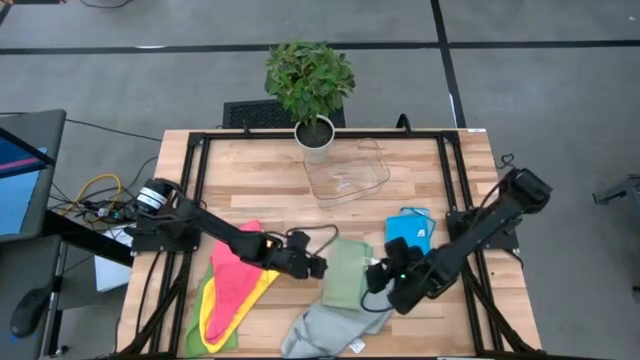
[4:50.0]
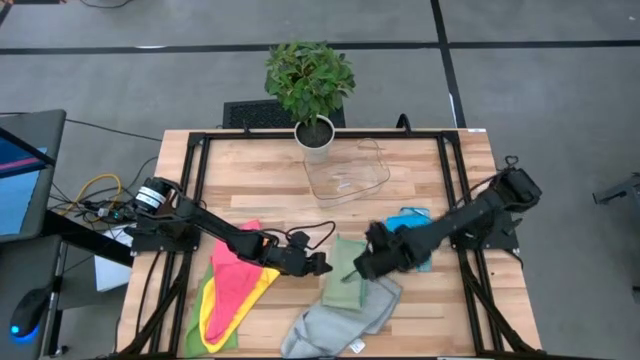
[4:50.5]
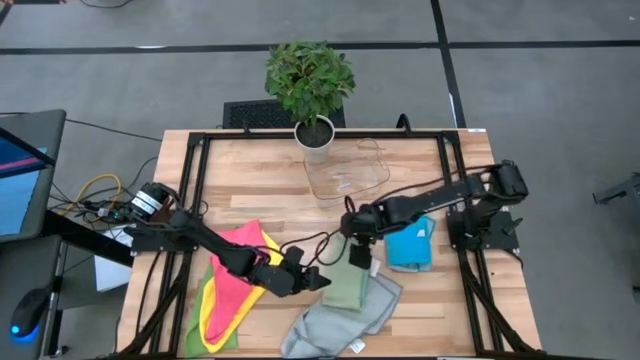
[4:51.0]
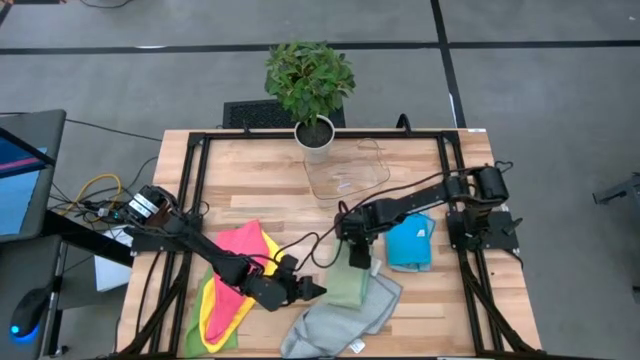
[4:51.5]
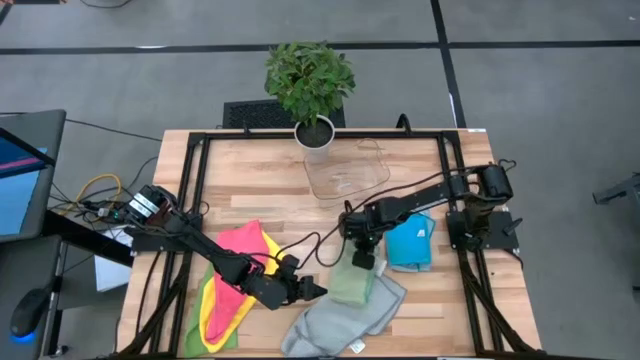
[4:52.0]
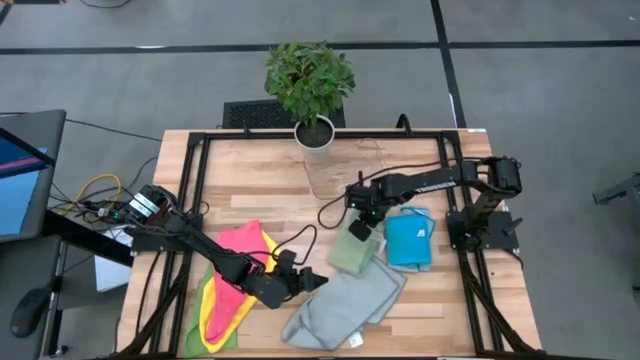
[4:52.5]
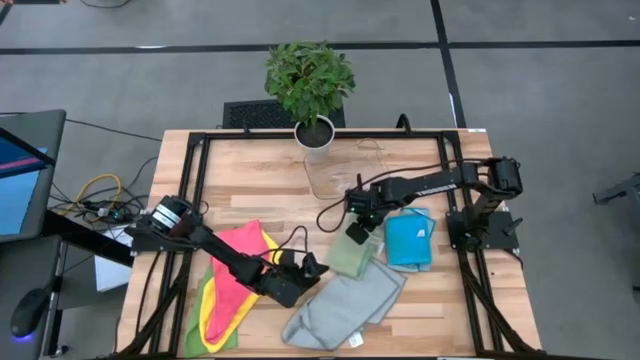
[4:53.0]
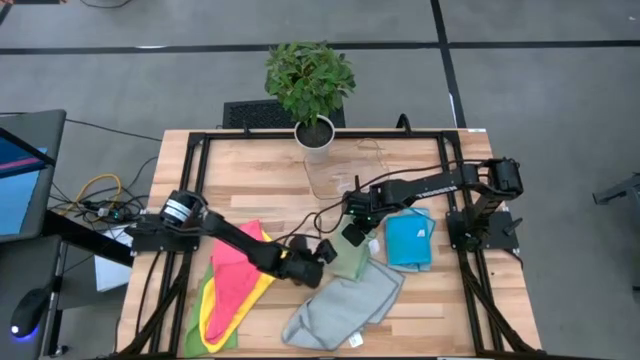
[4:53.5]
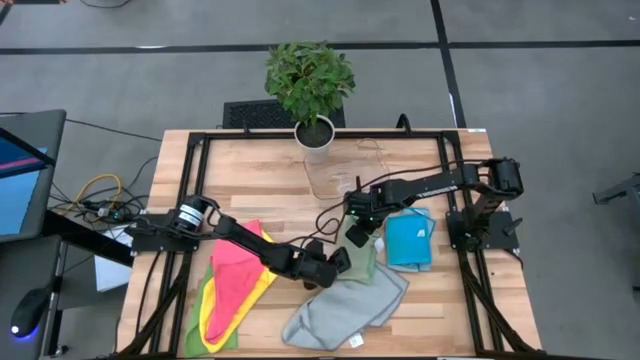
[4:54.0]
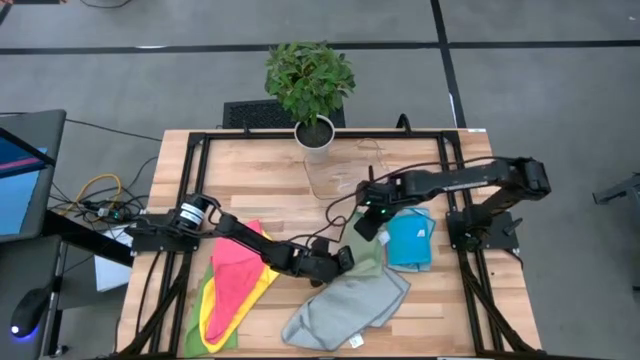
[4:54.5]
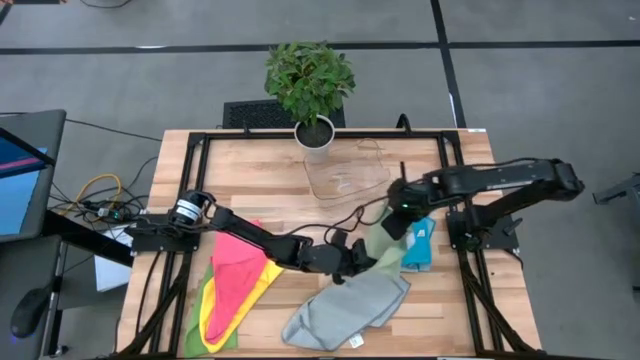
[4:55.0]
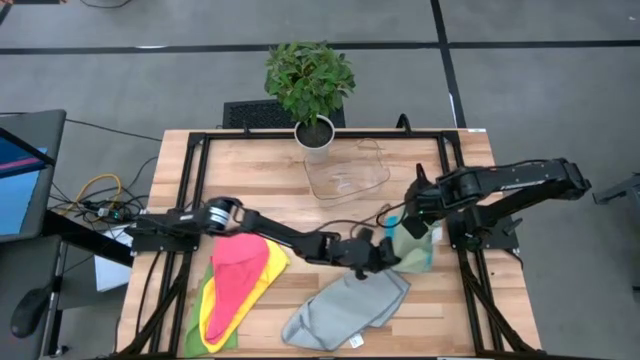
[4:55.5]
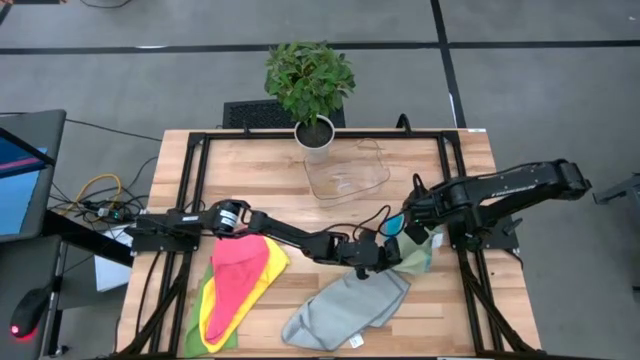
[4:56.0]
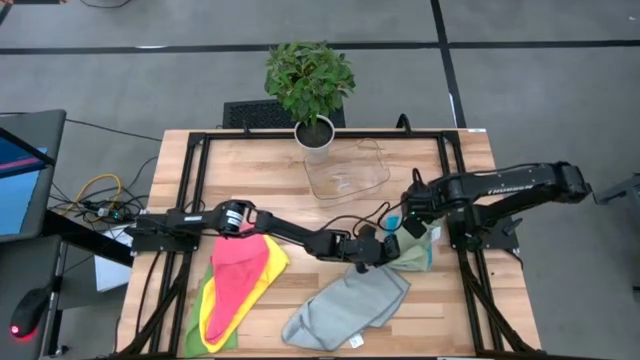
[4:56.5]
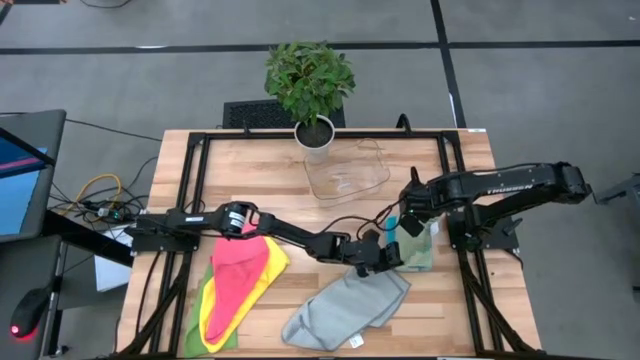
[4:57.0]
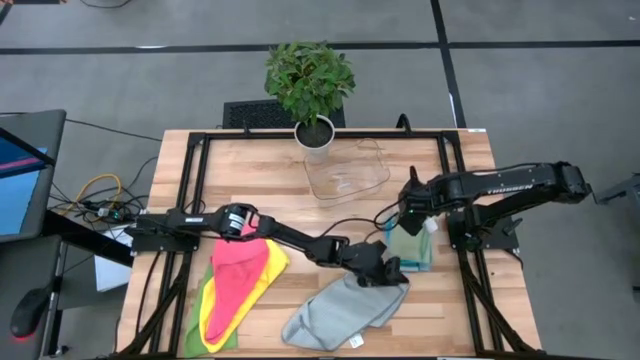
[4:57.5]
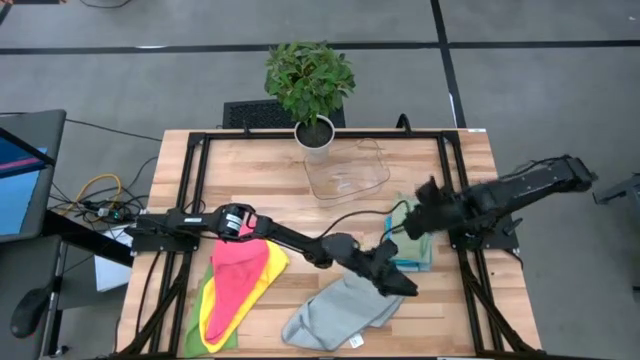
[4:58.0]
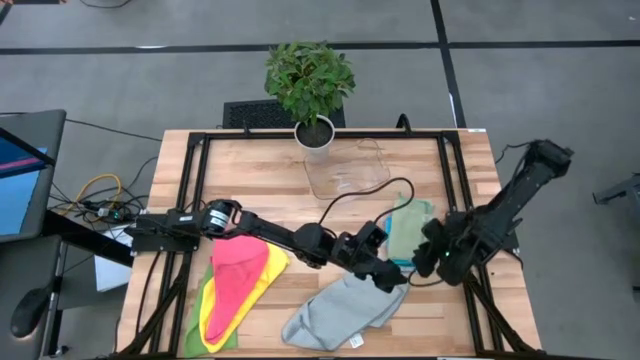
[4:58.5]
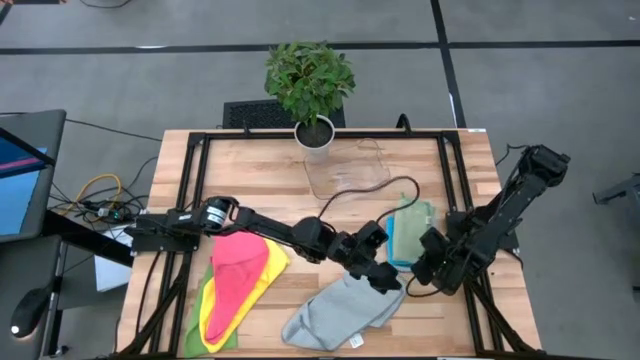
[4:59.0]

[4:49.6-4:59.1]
Task: Fold microfiber towels
Stack the light green microfiber cloth on top of the blue microfiber cloth

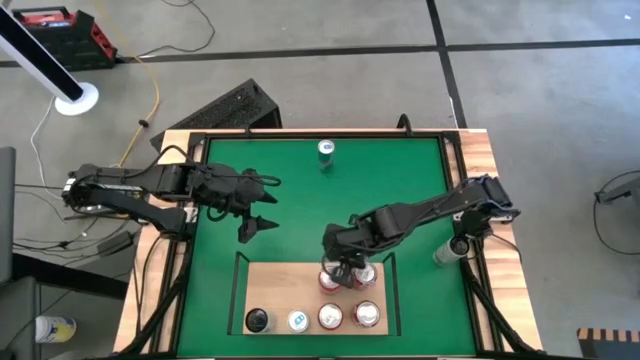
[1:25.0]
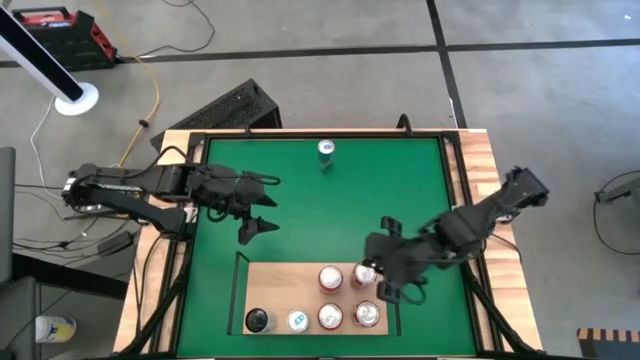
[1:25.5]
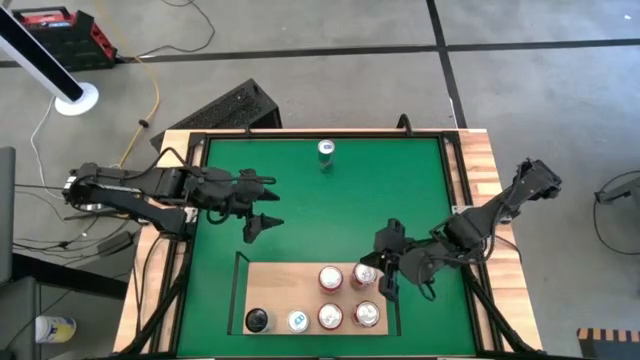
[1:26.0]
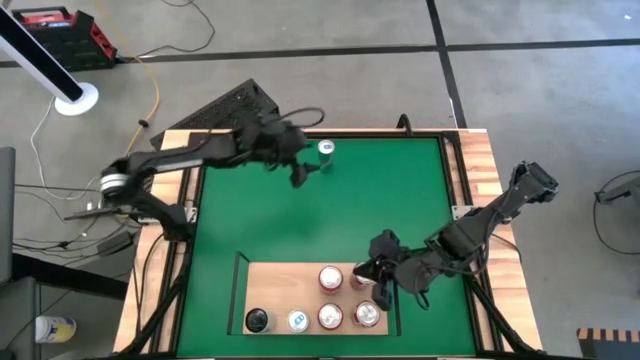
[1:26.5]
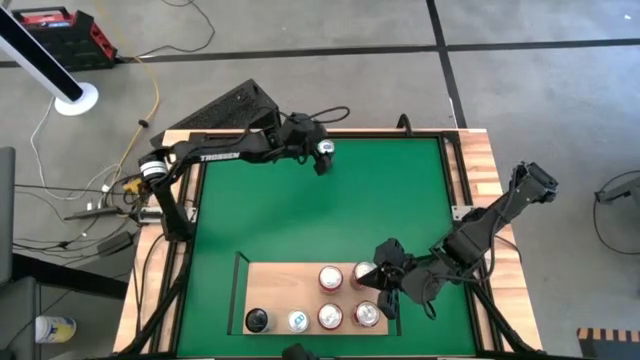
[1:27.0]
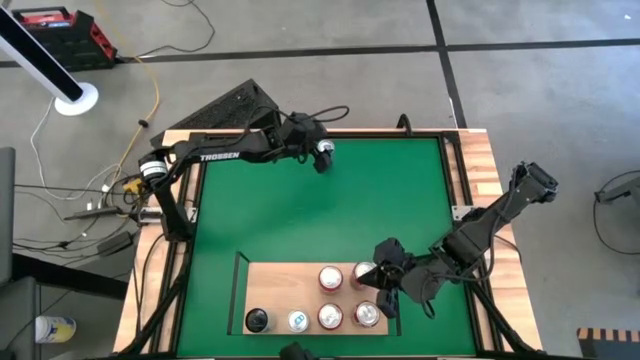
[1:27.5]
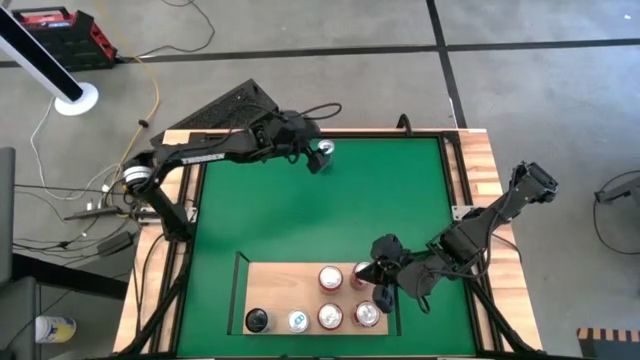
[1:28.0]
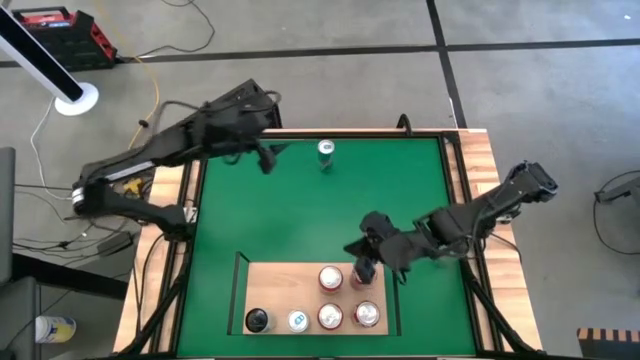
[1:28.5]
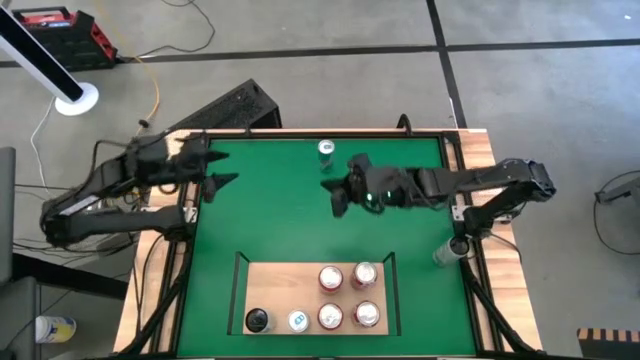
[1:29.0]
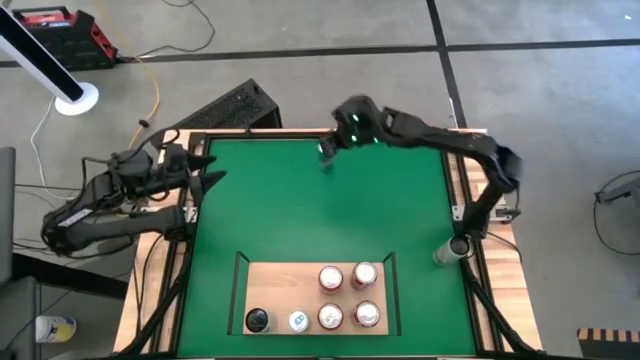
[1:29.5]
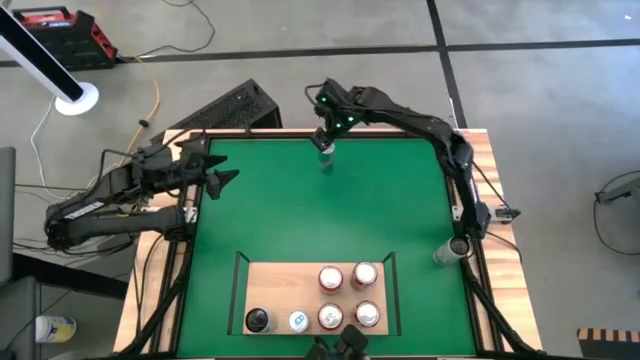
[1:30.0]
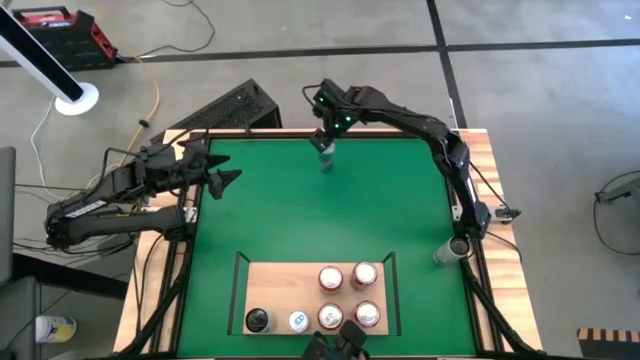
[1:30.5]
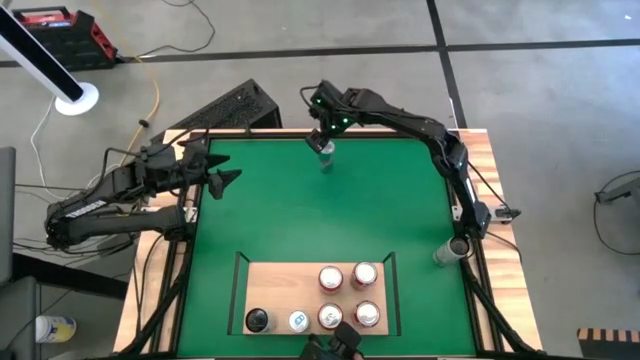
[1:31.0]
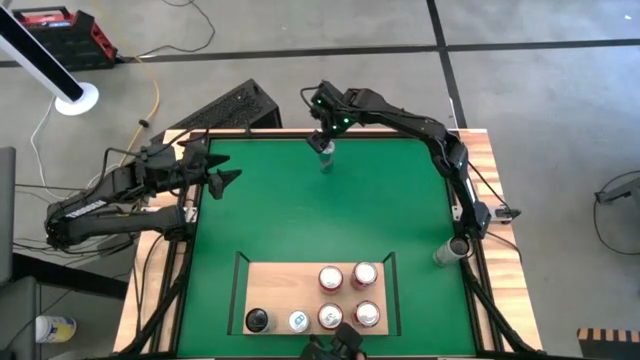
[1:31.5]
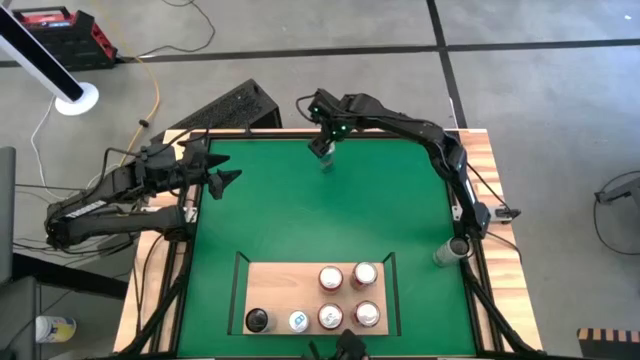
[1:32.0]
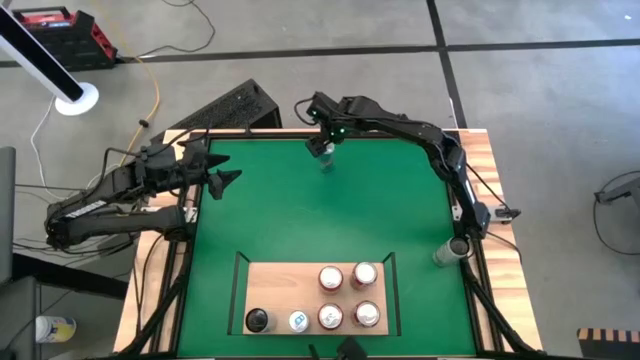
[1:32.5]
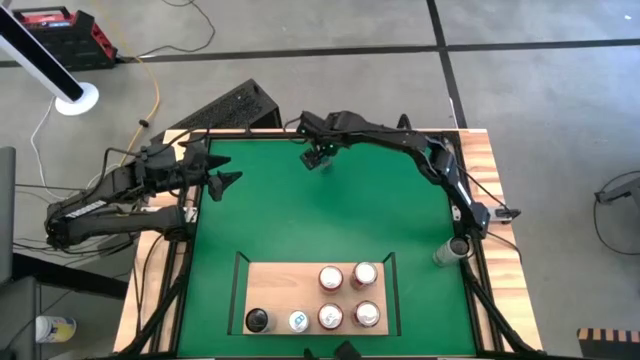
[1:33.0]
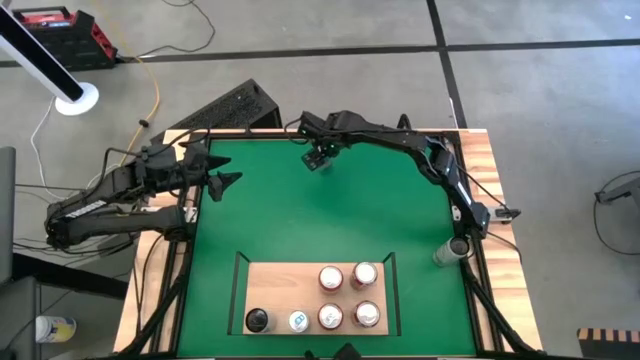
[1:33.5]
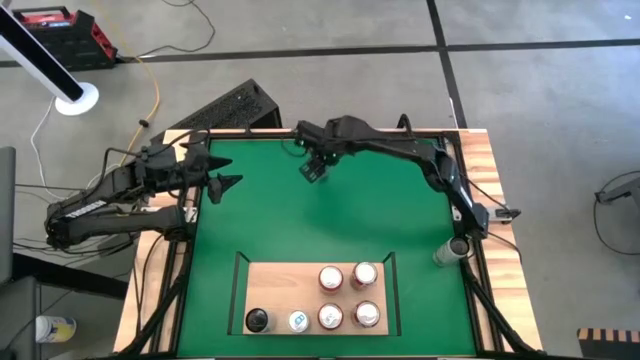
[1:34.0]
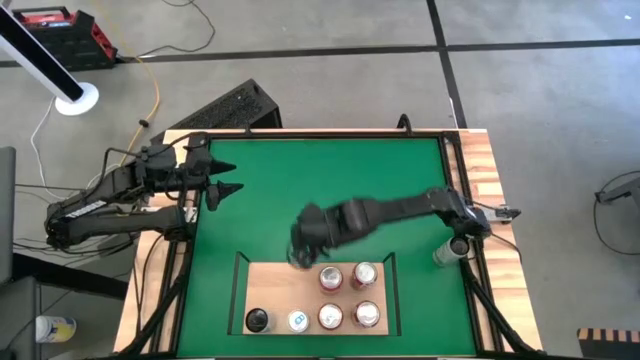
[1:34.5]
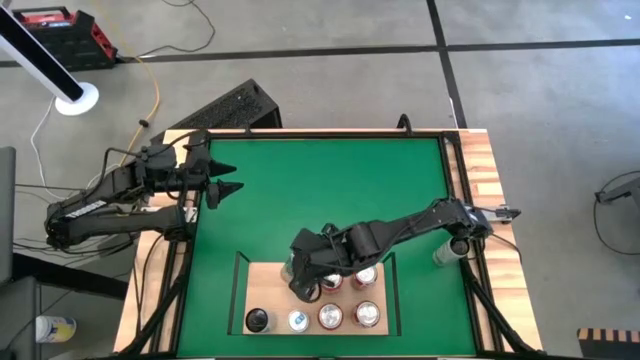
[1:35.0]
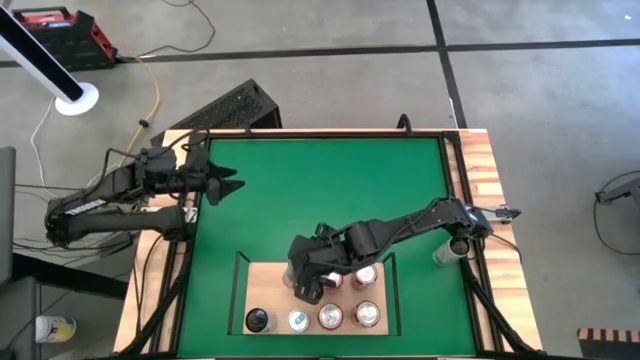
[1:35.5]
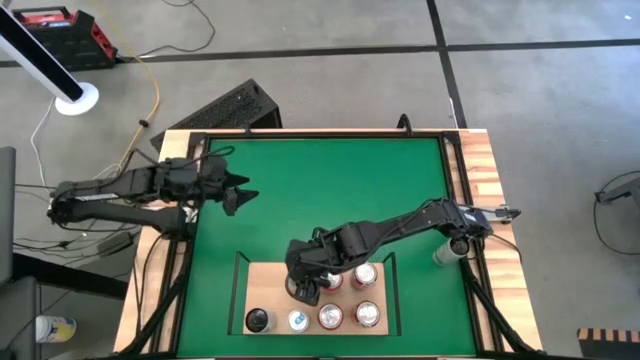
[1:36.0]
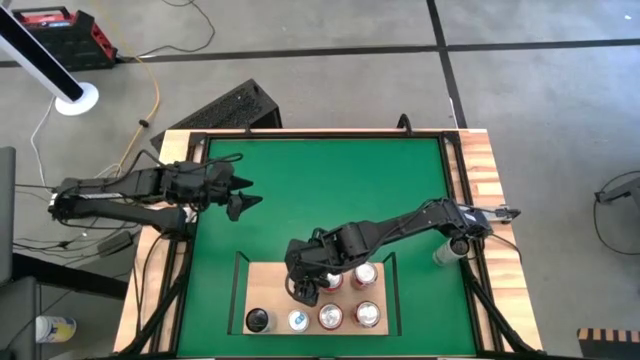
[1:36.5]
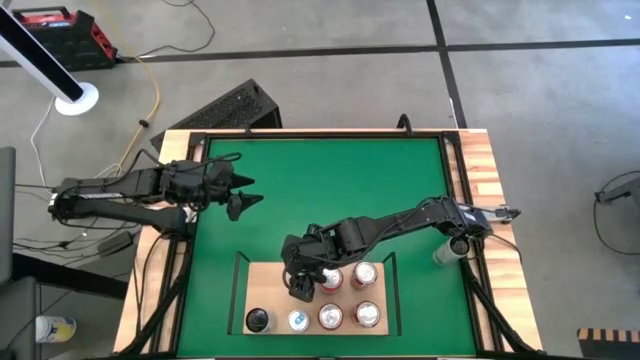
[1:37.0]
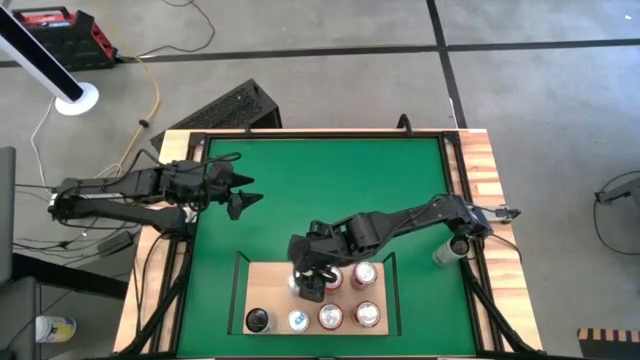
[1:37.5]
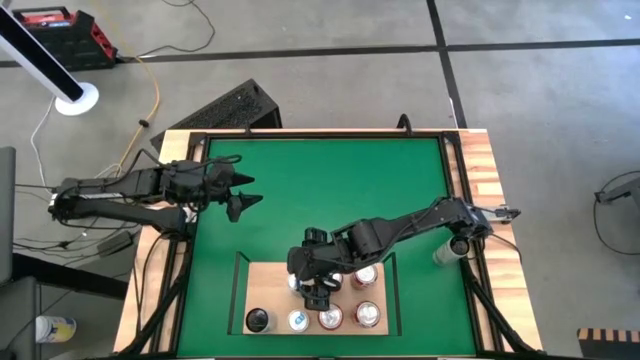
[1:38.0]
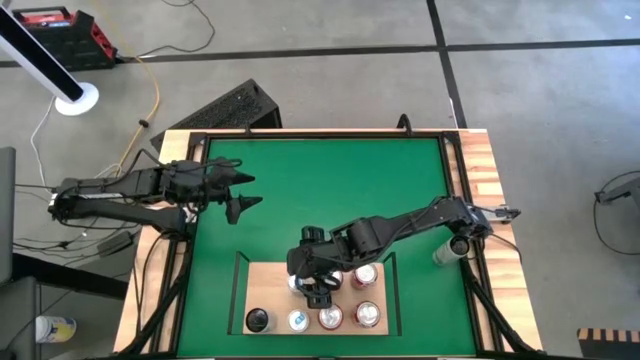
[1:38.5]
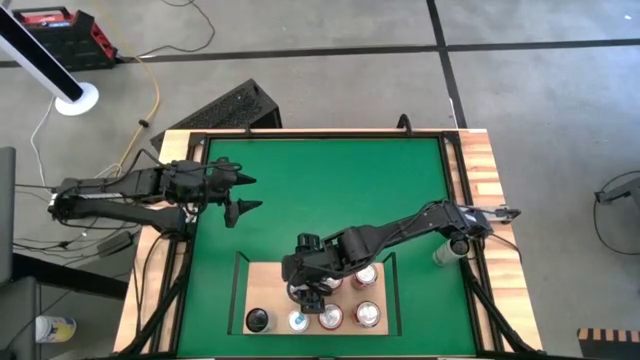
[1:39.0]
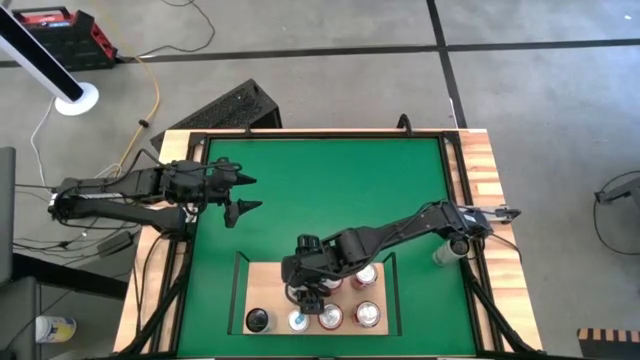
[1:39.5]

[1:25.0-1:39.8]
Task: Place canned beverage on shelf
Put the blue soda can on the shelf aligned with the other blue soda can
